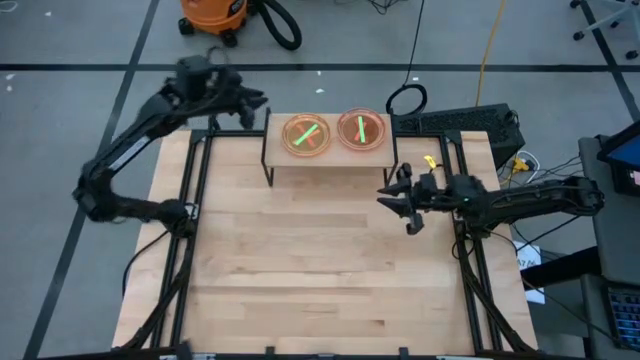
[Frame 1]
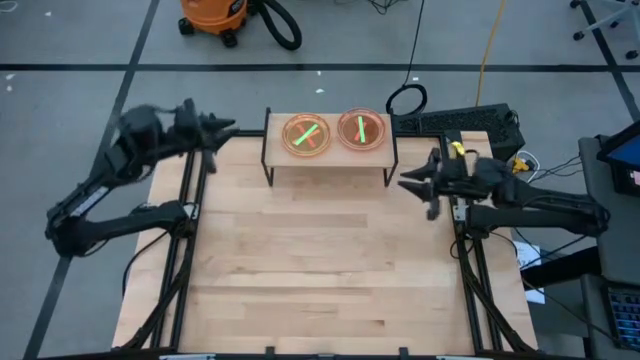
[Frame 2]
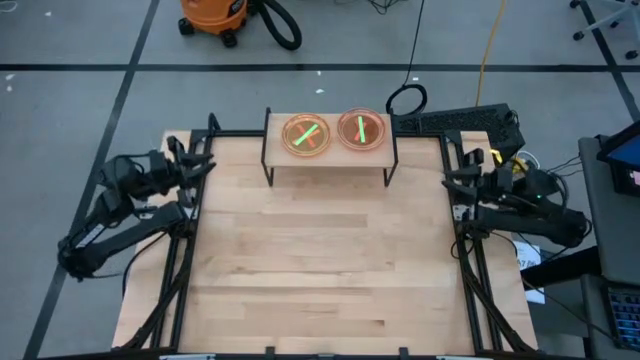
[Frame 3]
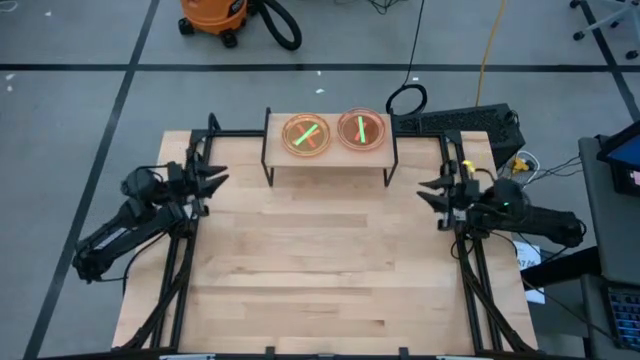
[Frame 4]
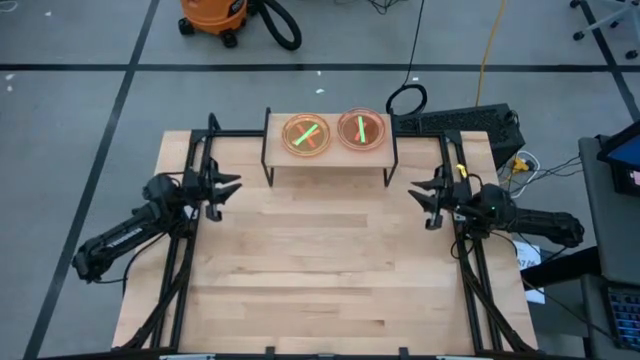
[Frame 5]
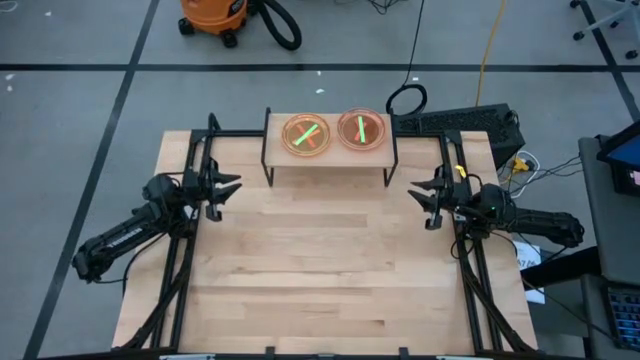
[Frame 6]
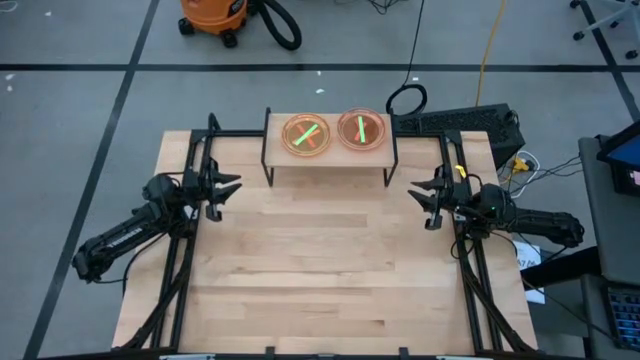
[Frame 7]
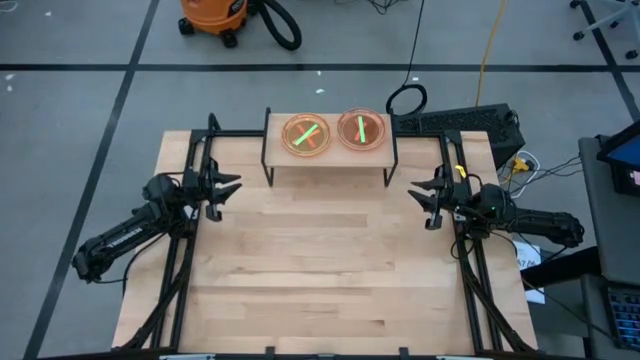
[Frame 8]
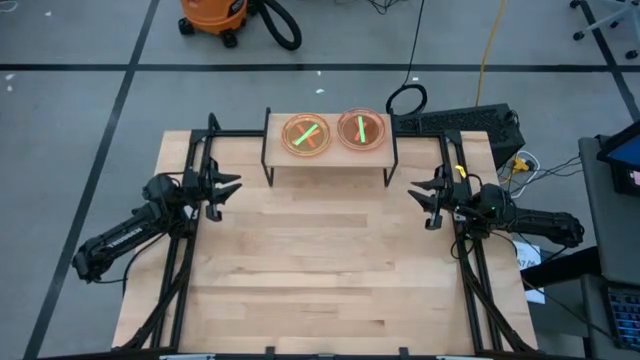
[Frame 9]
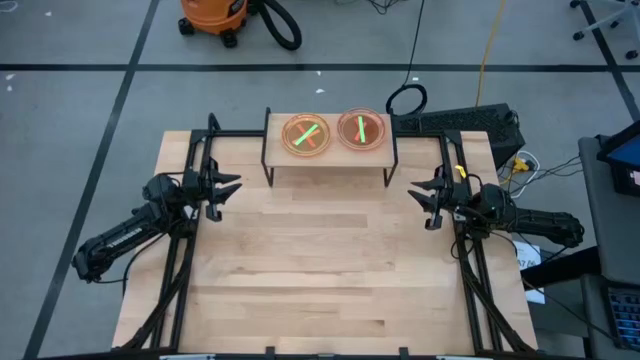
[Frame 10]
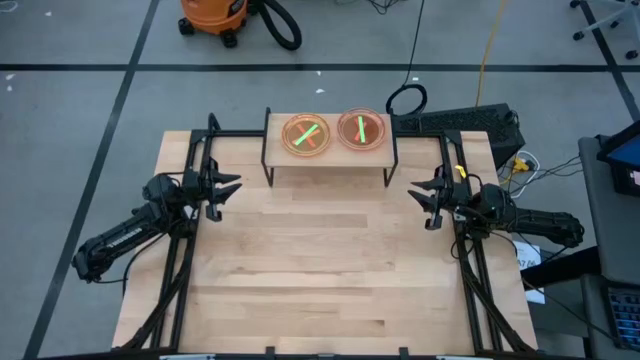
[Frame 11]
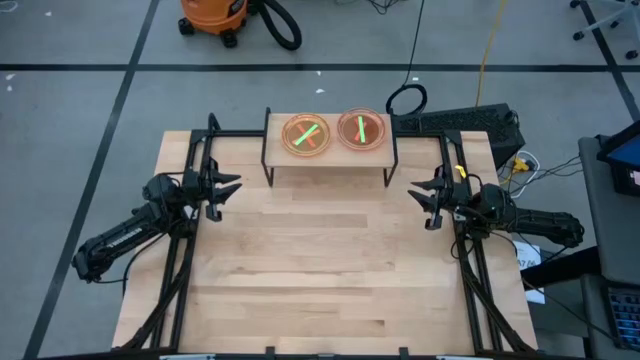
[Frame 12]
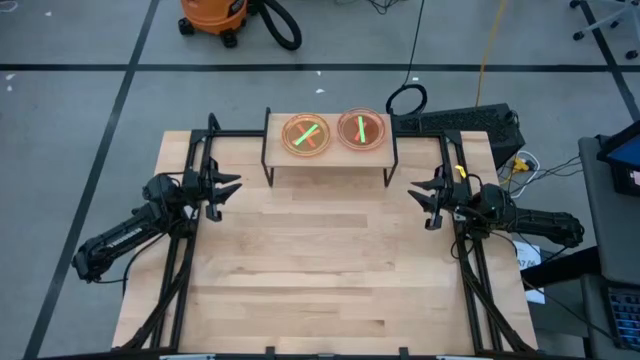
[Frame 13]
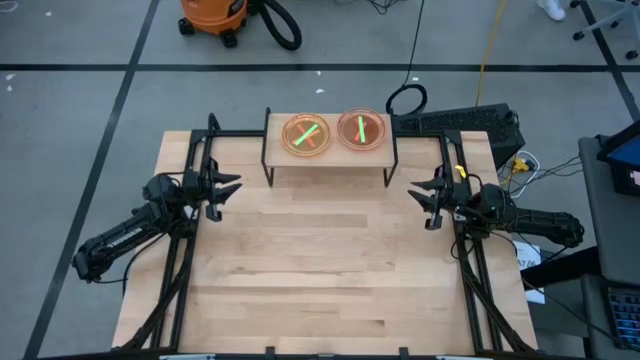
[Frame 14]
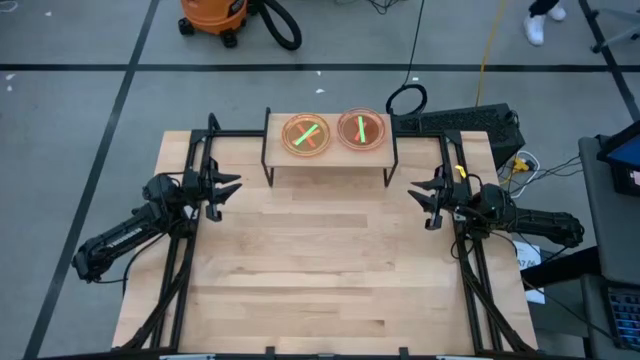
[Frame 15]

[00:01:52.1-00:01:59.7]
Task: Place and stack plates onto a shelf
Return to Home Position

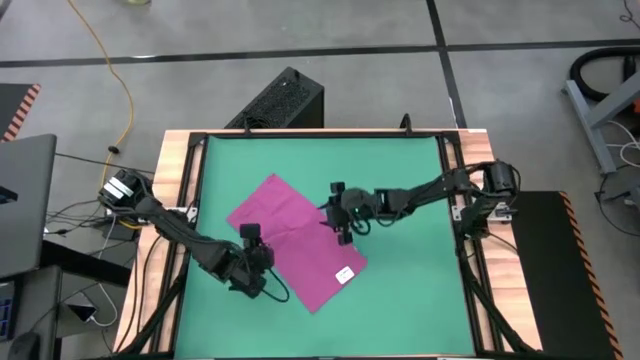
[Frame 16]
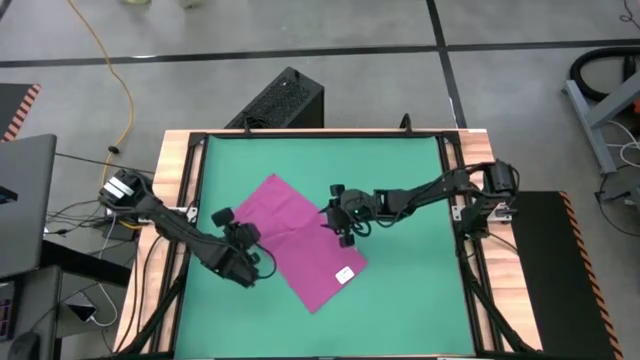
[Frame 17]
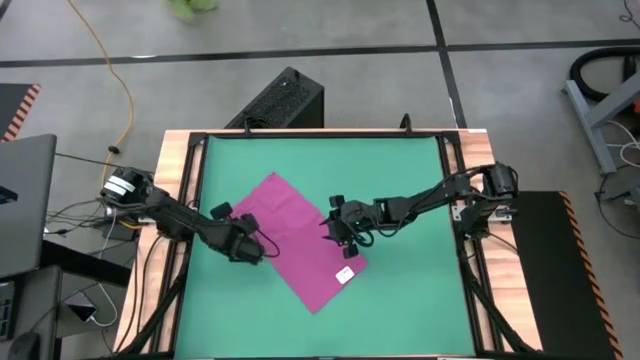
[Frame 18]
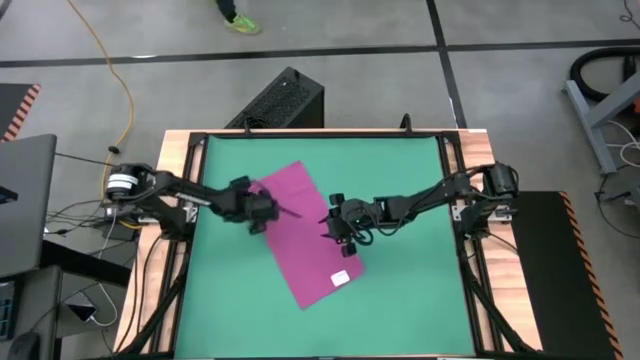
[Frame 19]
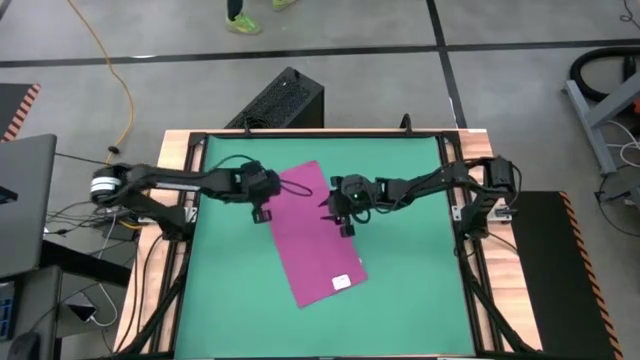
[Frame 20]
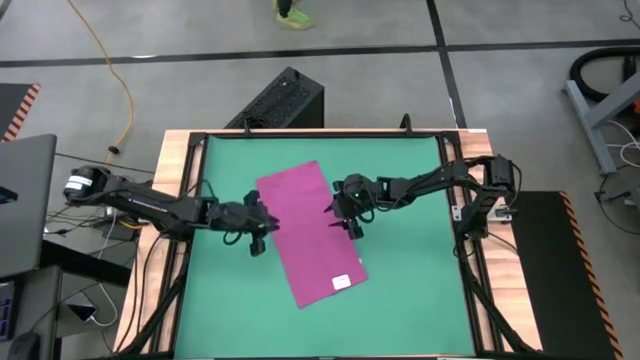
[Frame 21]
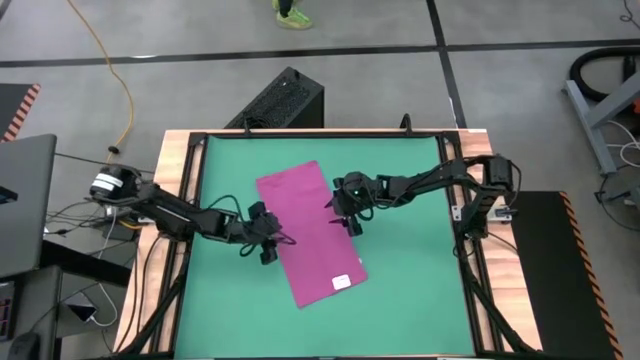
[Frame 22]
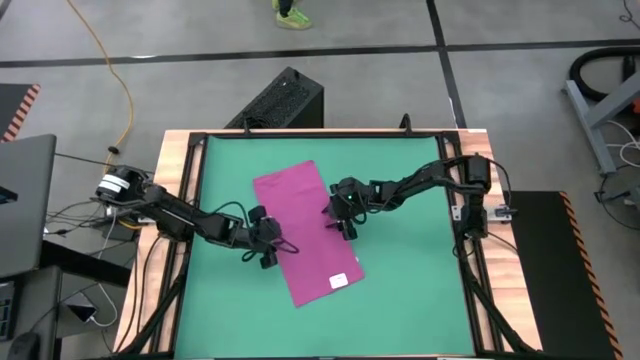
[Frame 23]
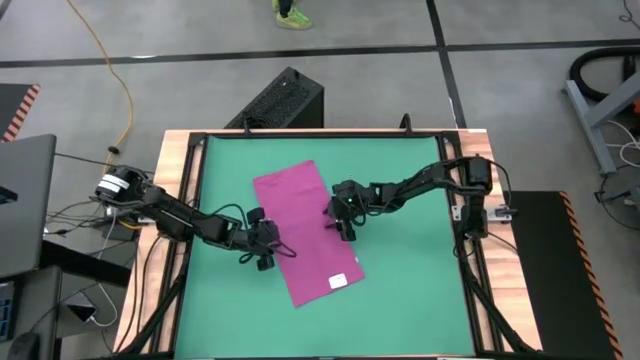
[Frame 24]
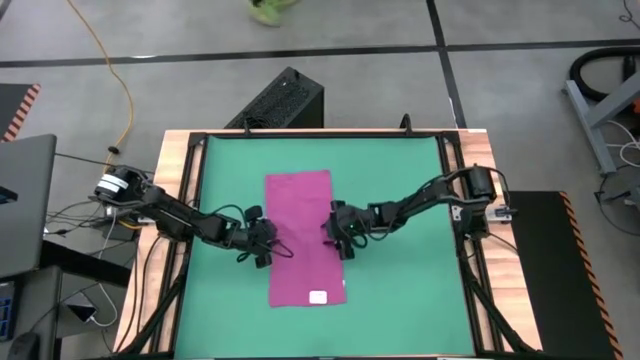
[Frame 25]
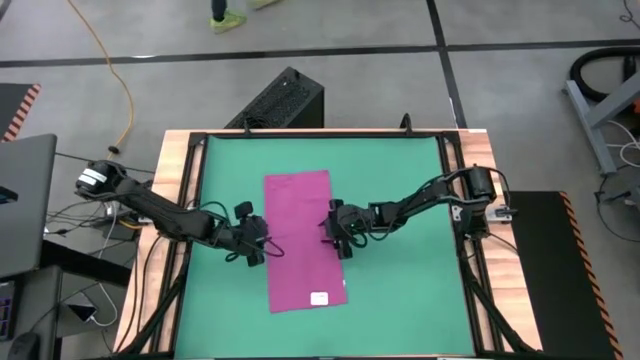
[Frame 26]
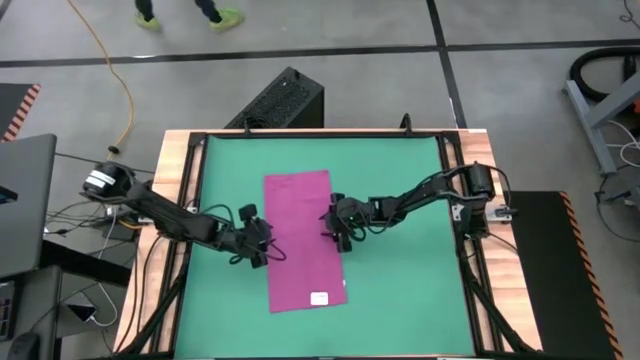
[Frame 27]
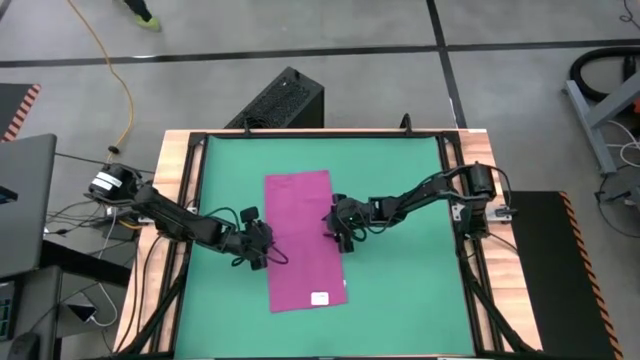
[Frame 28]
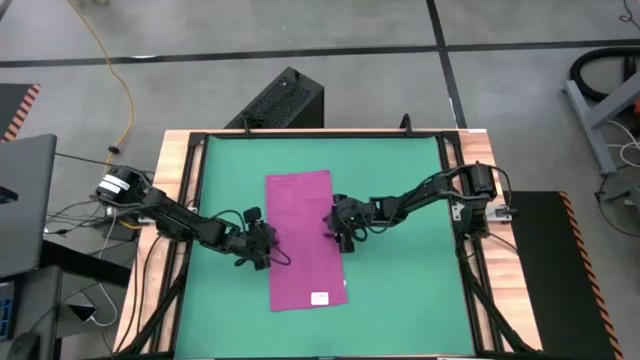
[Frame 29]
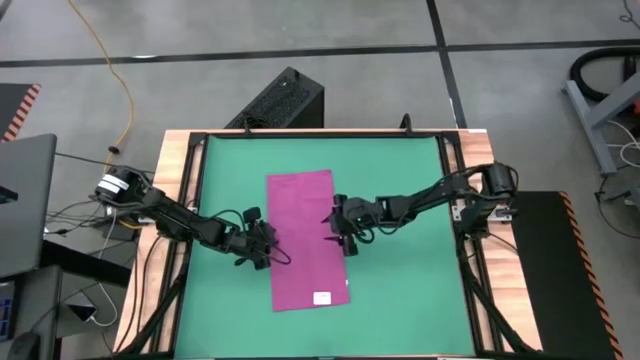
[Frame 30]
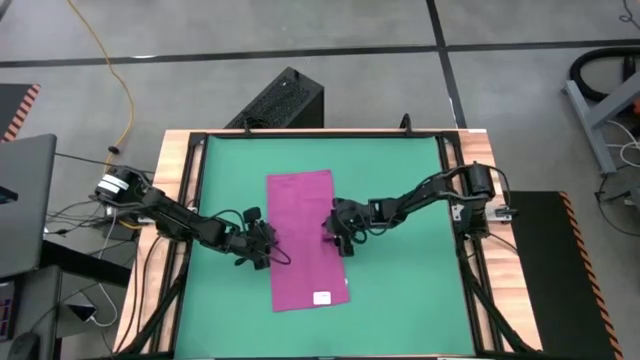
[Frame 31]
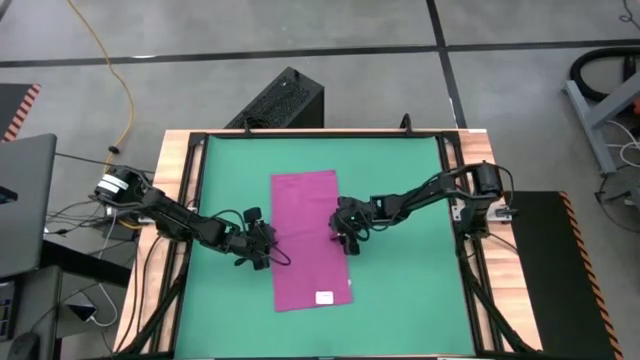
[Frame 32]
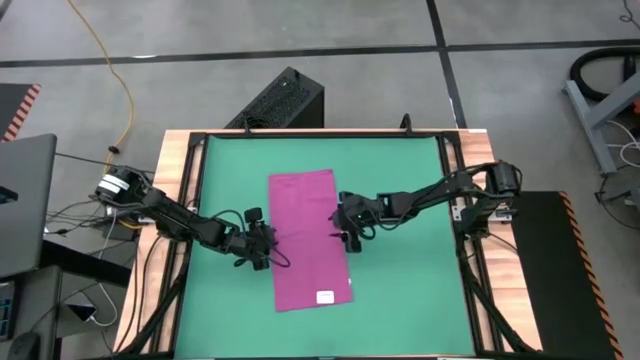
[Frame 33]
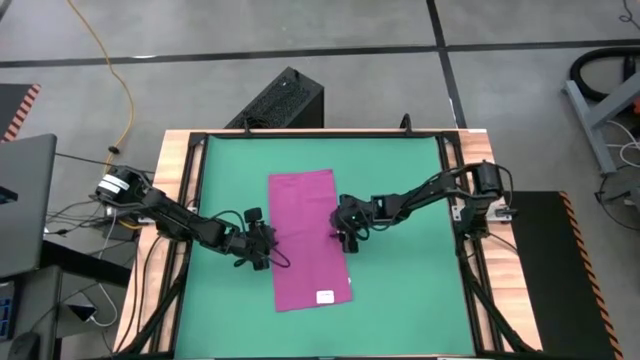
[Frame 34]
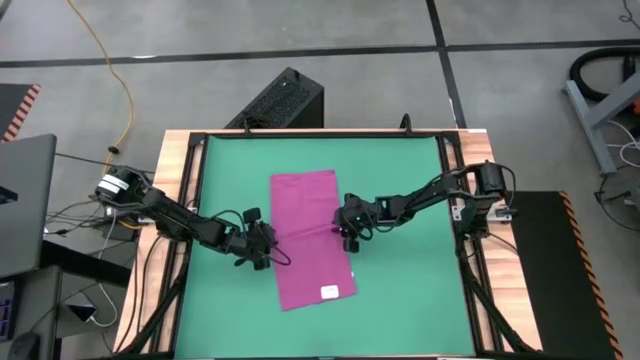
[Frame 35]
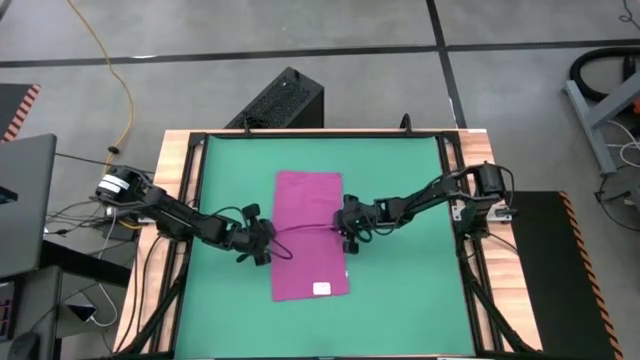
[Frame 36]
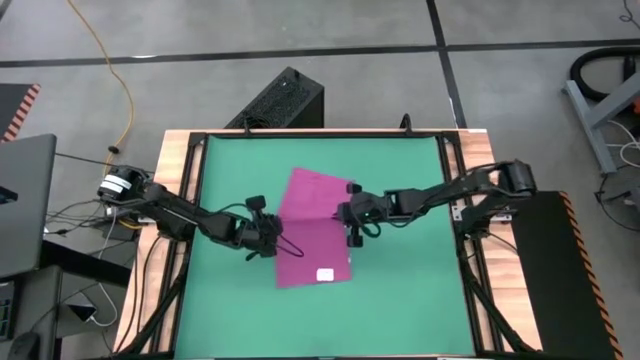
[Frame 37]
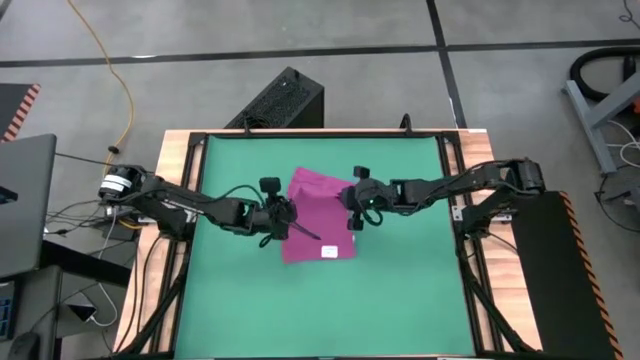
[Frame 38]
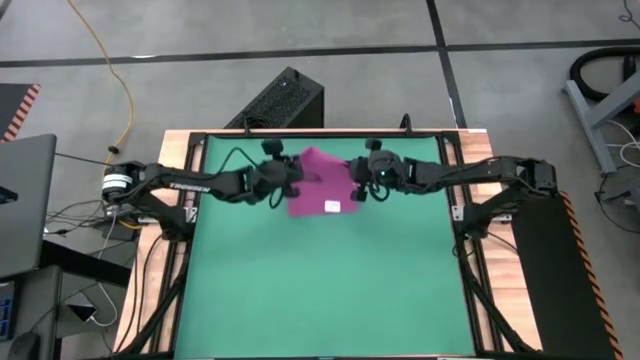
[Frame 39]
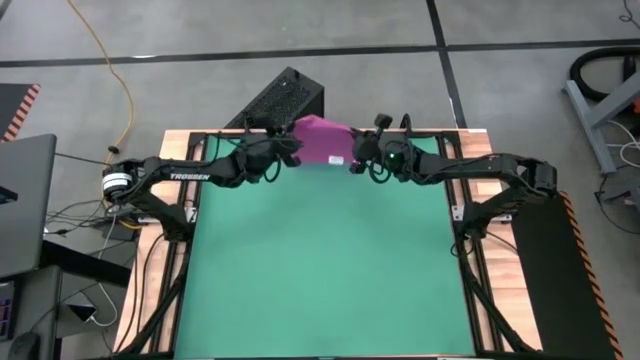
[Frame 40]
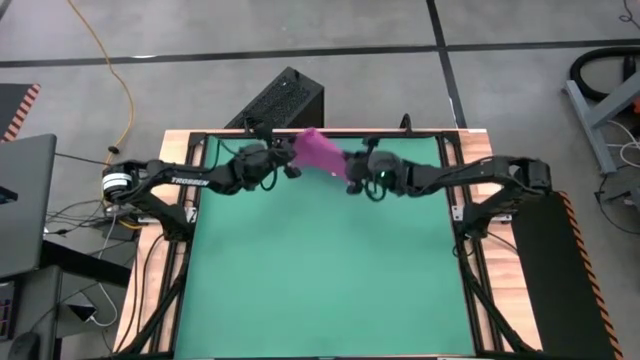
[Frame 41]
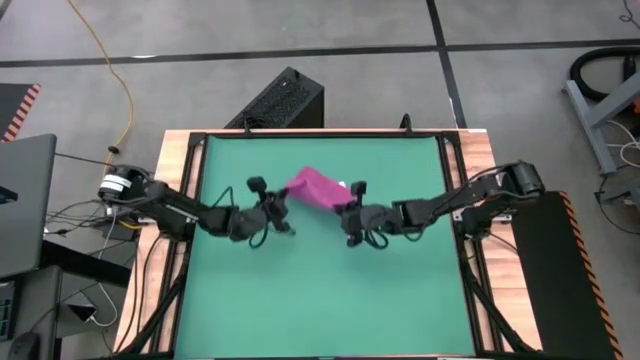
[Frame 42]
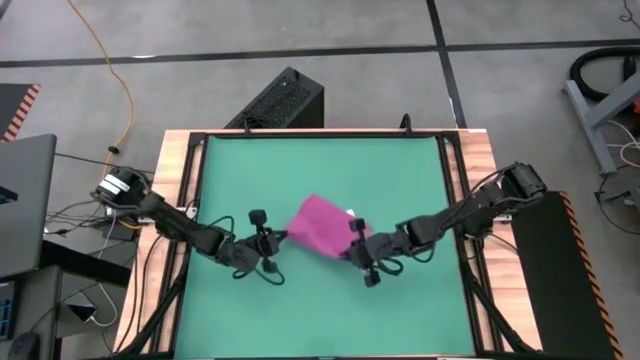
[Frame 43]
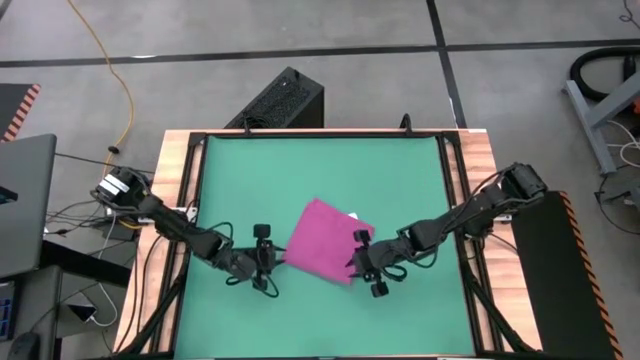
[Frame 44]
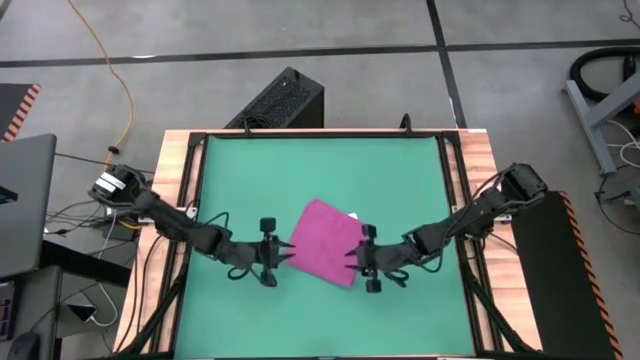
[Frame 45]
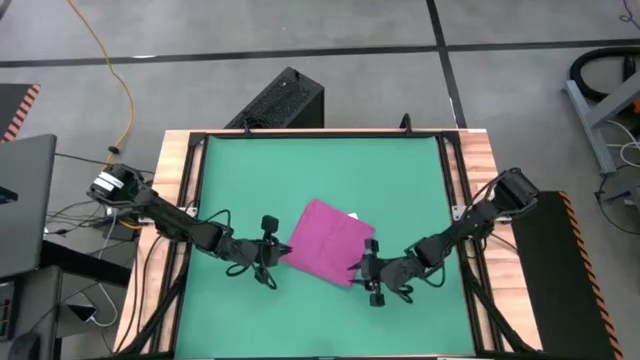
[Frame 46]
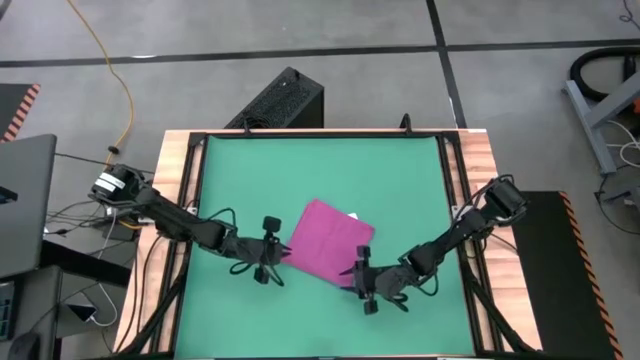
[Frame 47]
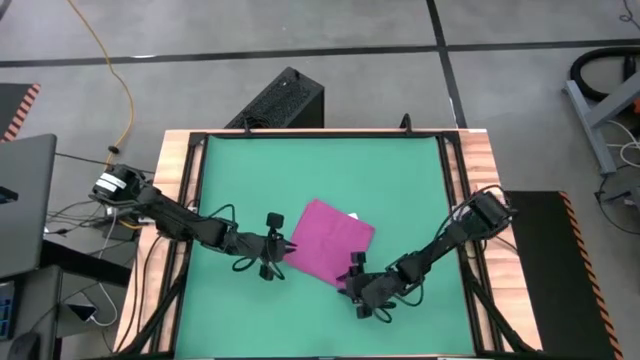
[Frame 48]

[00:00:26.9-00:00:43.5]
Task: Roll towel
Fold the violet towel
